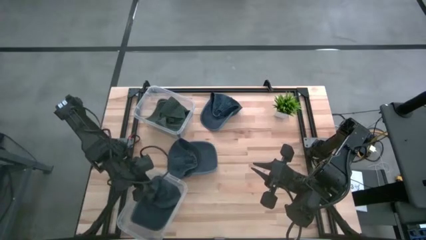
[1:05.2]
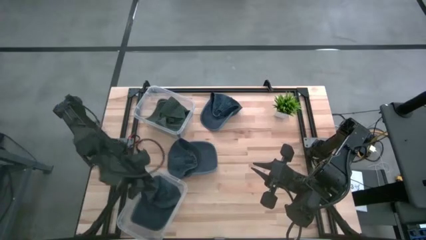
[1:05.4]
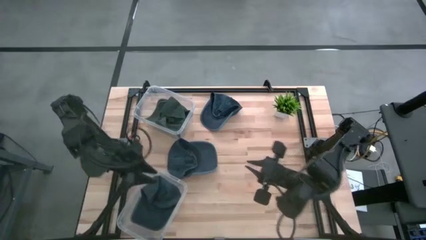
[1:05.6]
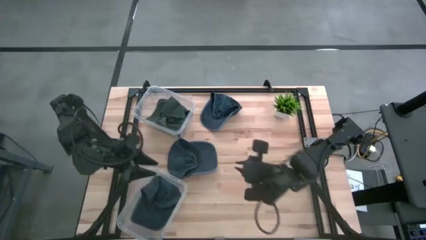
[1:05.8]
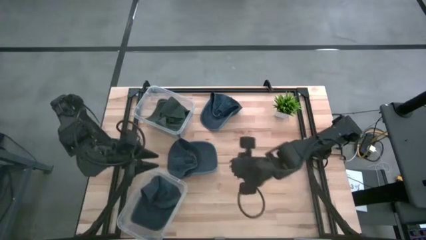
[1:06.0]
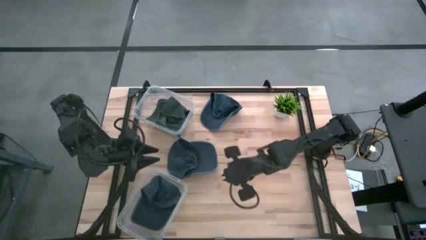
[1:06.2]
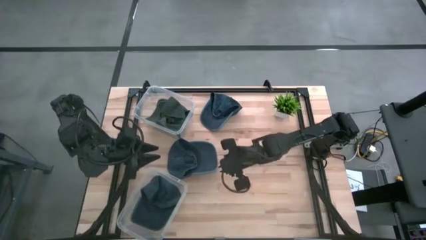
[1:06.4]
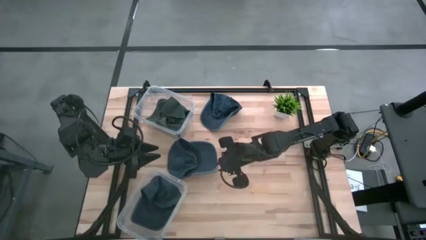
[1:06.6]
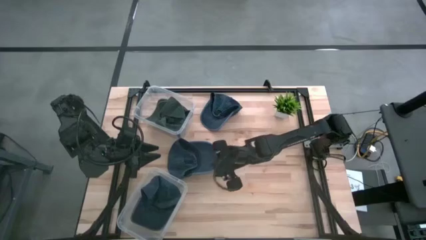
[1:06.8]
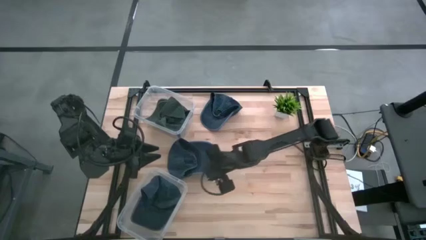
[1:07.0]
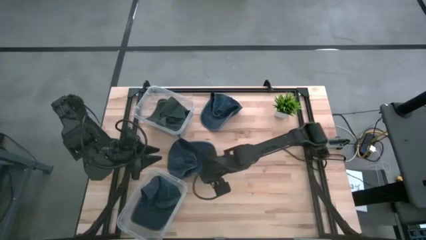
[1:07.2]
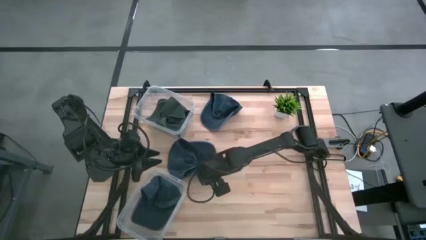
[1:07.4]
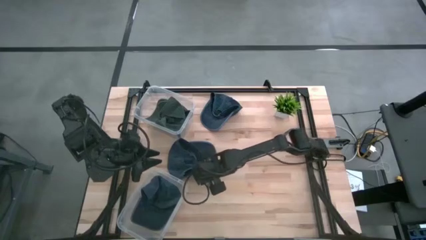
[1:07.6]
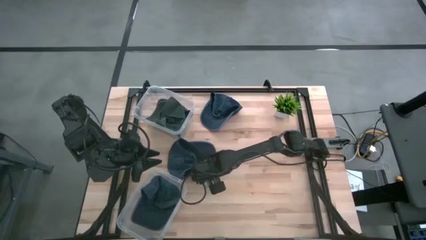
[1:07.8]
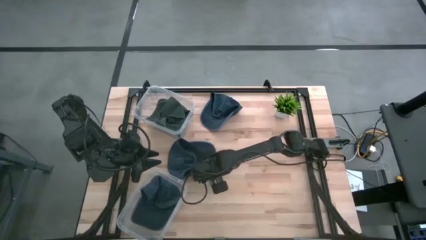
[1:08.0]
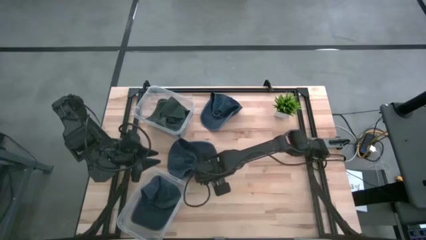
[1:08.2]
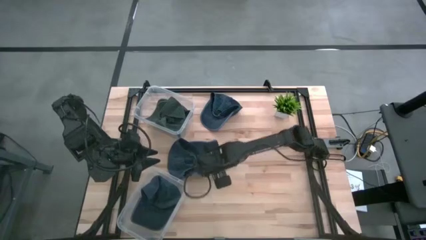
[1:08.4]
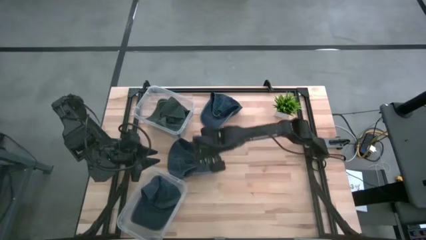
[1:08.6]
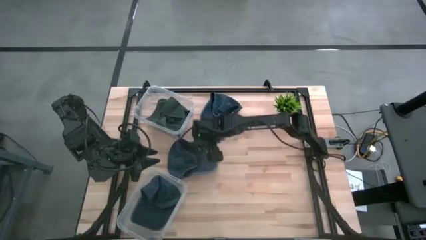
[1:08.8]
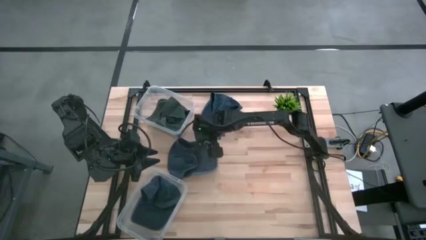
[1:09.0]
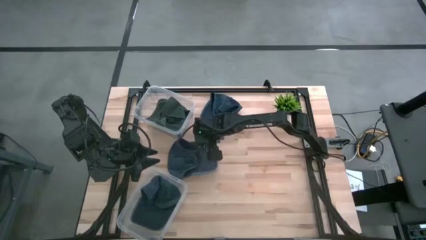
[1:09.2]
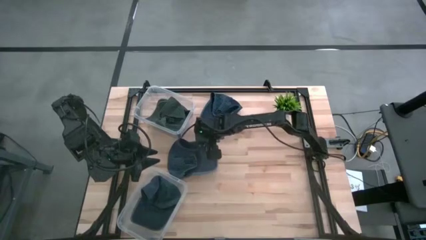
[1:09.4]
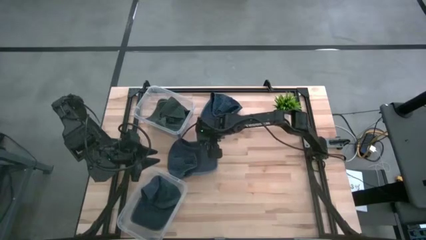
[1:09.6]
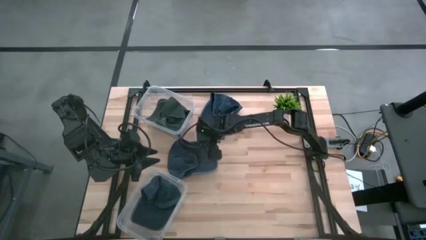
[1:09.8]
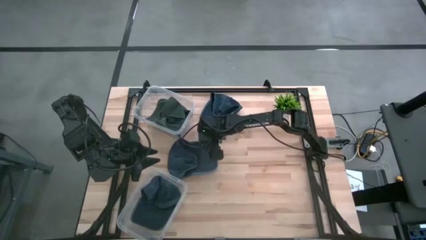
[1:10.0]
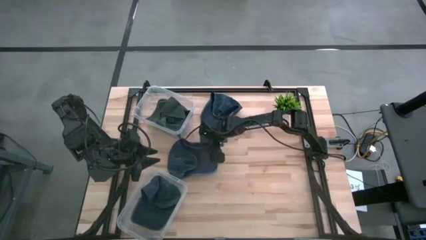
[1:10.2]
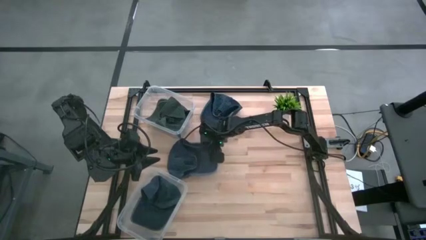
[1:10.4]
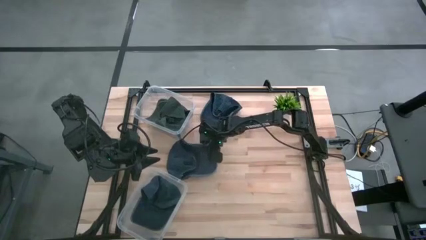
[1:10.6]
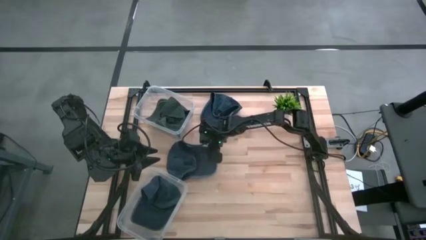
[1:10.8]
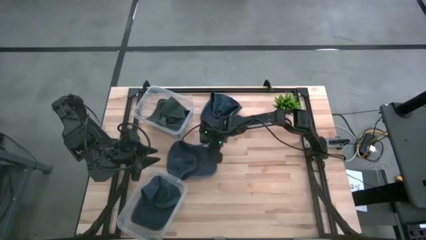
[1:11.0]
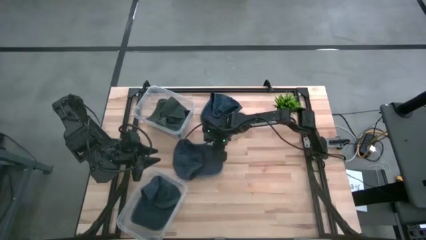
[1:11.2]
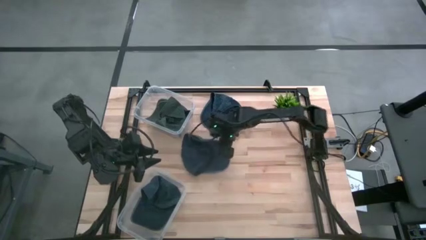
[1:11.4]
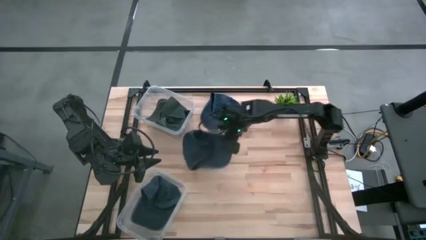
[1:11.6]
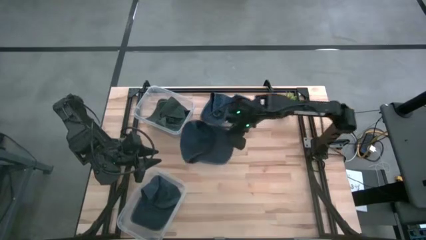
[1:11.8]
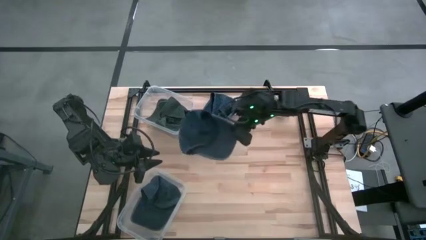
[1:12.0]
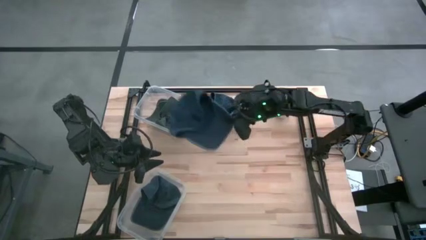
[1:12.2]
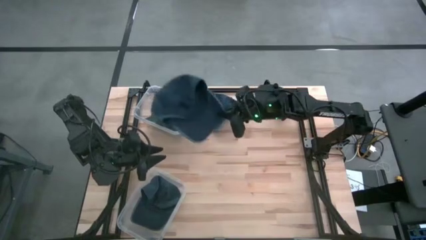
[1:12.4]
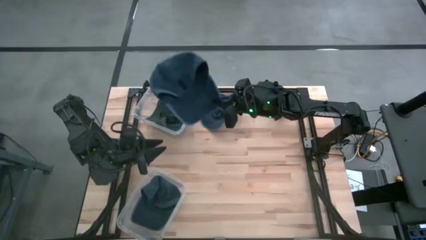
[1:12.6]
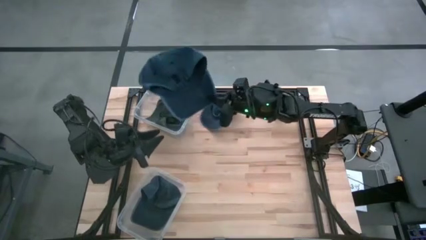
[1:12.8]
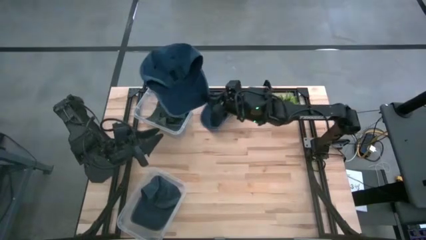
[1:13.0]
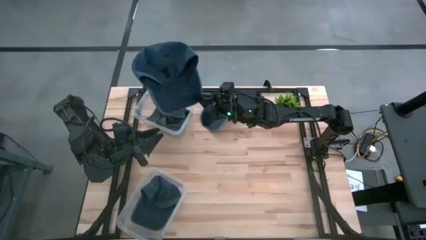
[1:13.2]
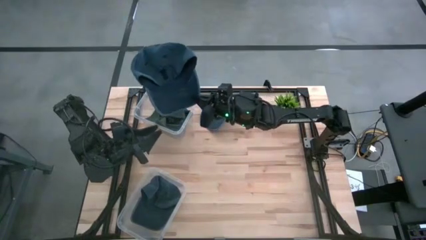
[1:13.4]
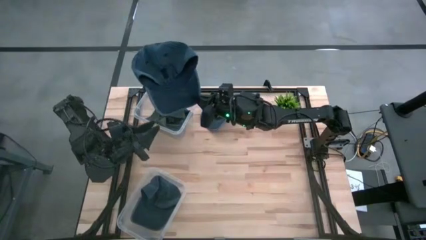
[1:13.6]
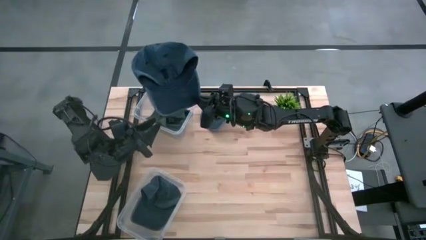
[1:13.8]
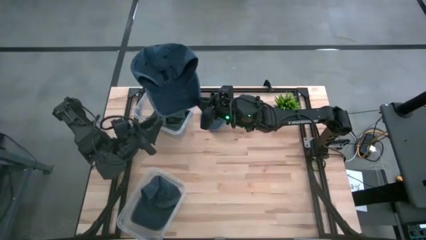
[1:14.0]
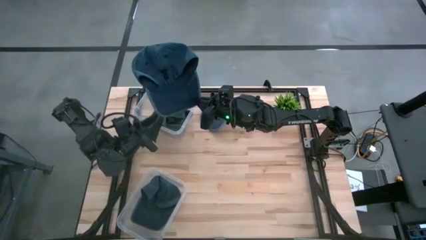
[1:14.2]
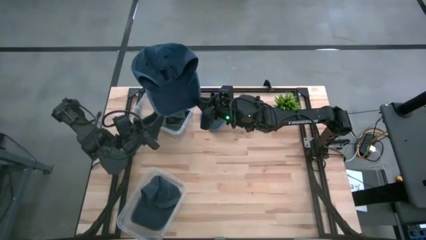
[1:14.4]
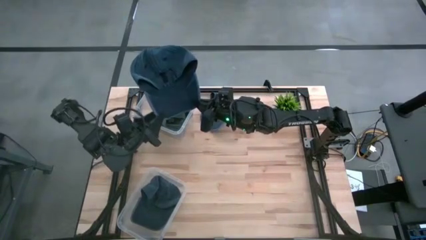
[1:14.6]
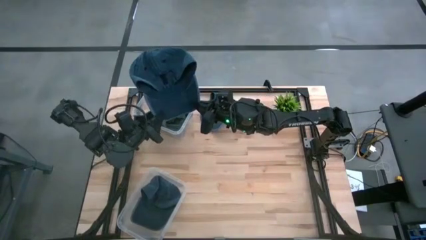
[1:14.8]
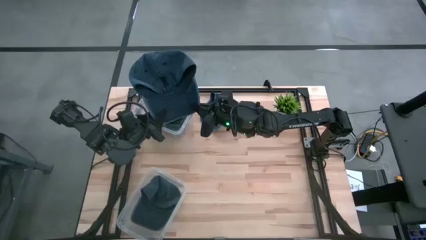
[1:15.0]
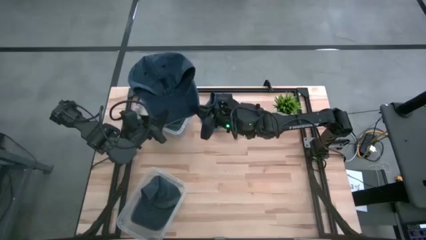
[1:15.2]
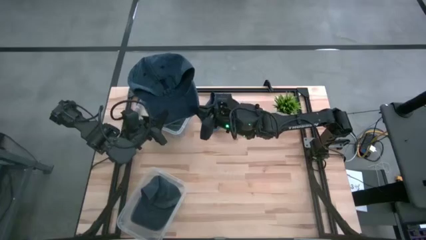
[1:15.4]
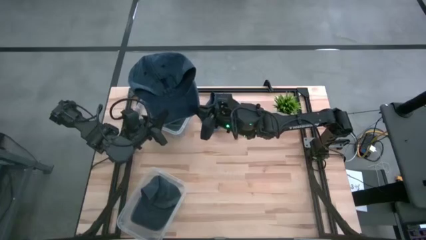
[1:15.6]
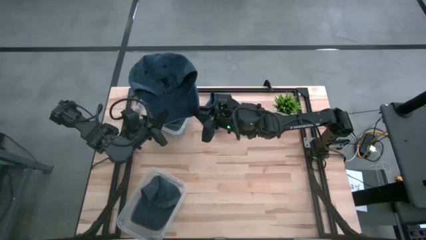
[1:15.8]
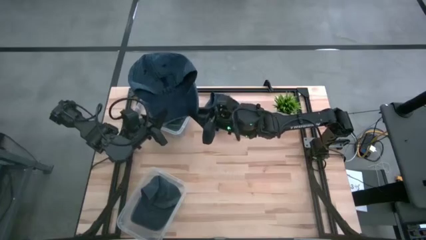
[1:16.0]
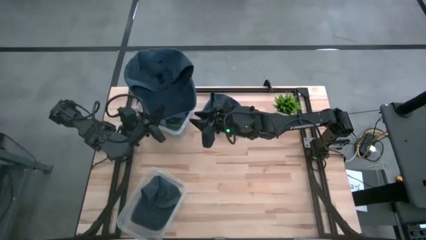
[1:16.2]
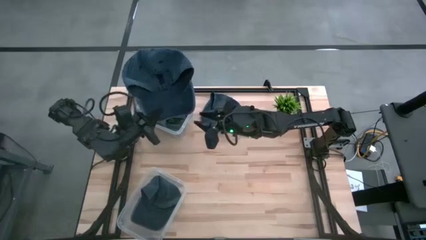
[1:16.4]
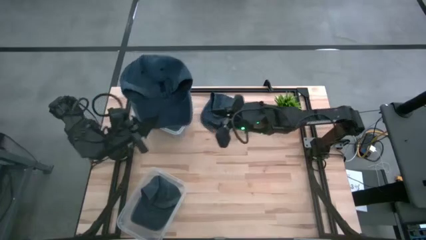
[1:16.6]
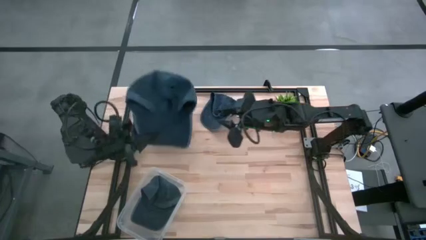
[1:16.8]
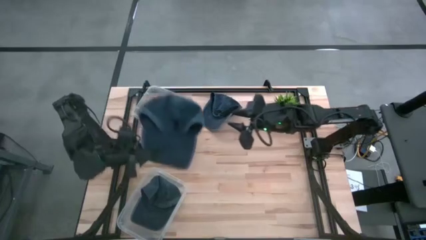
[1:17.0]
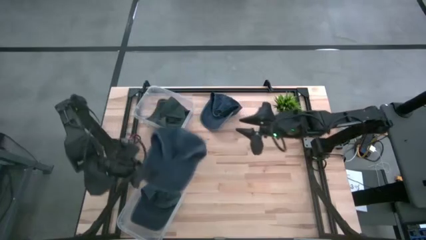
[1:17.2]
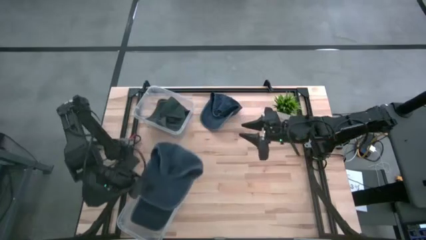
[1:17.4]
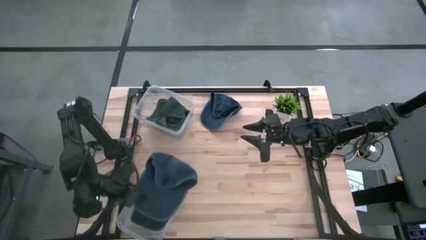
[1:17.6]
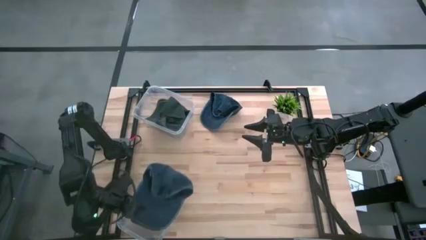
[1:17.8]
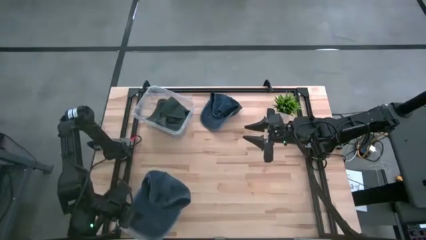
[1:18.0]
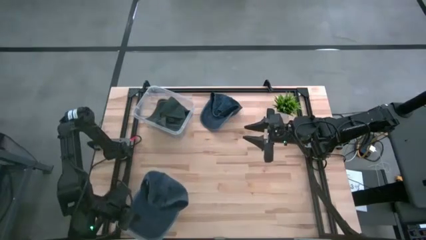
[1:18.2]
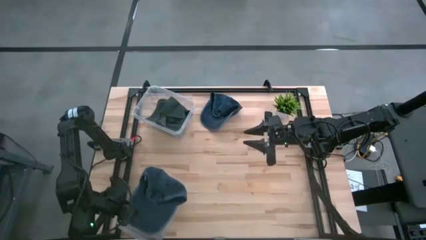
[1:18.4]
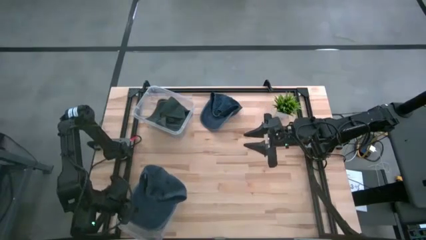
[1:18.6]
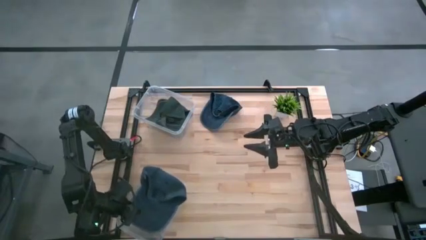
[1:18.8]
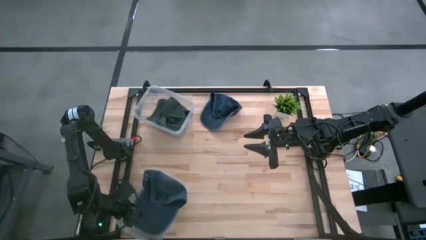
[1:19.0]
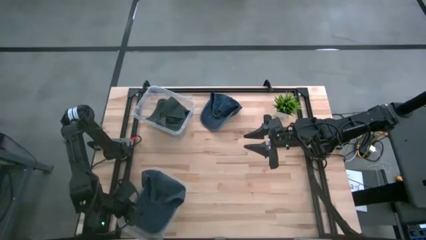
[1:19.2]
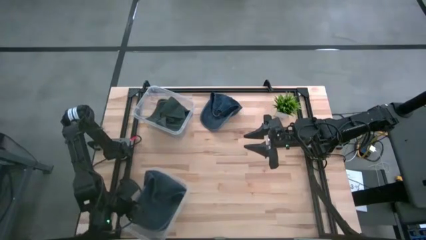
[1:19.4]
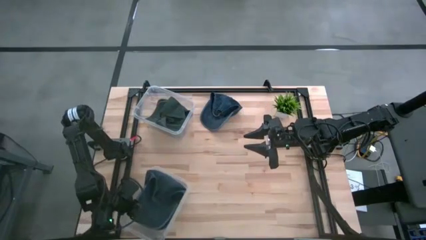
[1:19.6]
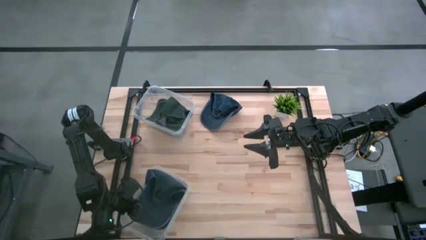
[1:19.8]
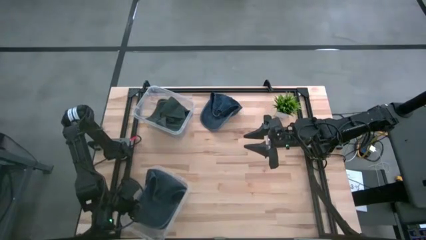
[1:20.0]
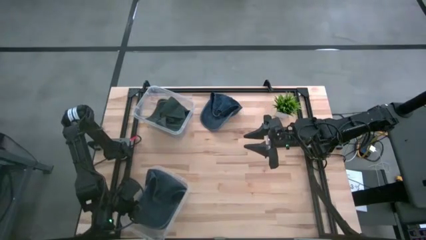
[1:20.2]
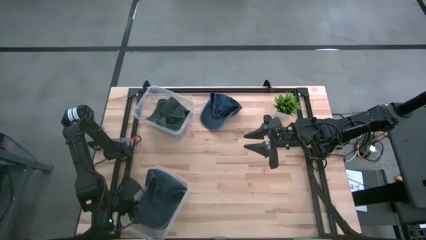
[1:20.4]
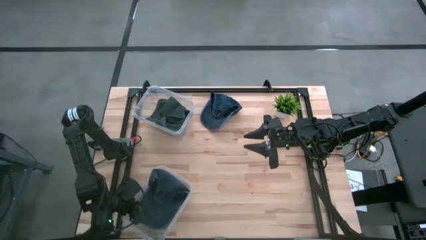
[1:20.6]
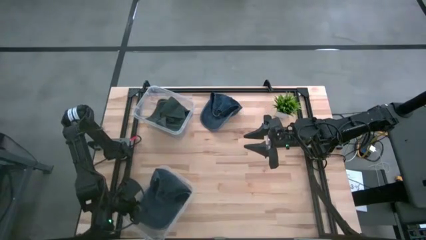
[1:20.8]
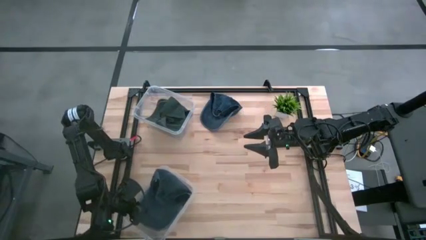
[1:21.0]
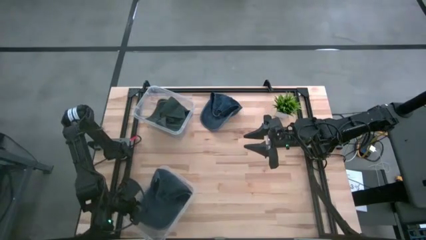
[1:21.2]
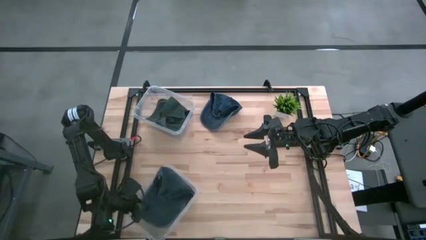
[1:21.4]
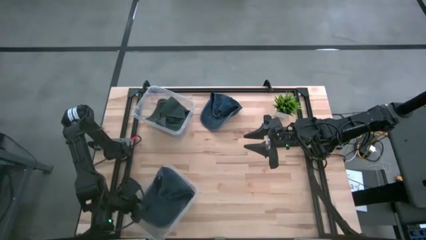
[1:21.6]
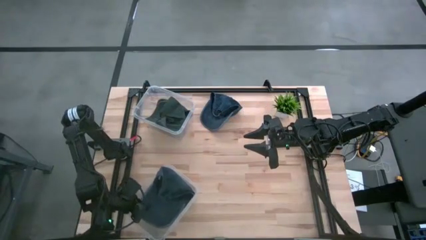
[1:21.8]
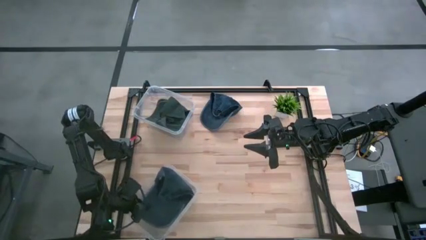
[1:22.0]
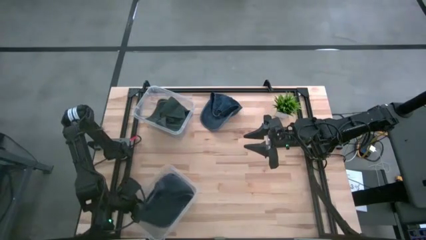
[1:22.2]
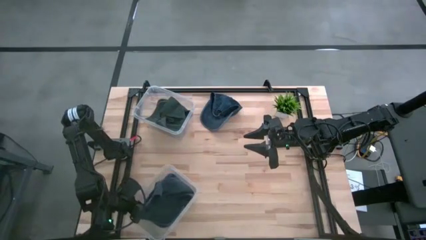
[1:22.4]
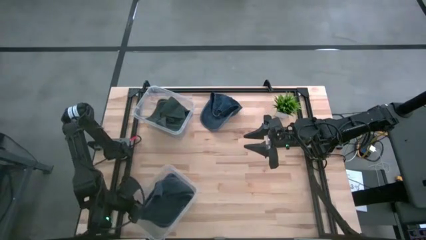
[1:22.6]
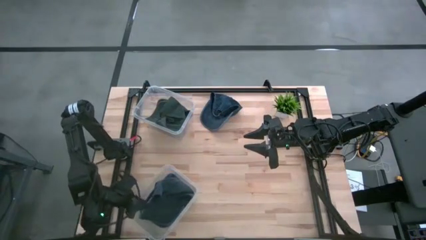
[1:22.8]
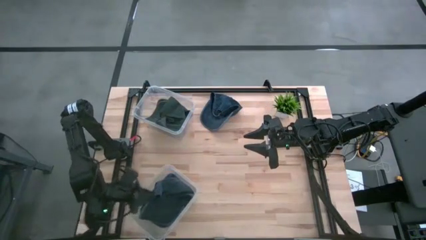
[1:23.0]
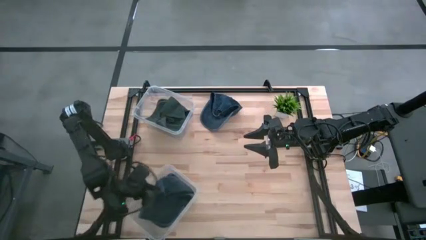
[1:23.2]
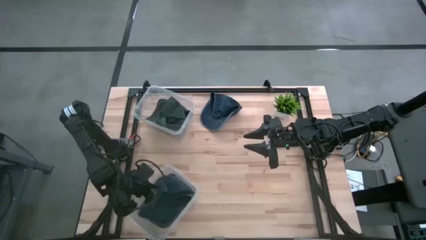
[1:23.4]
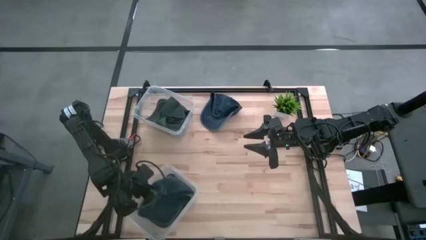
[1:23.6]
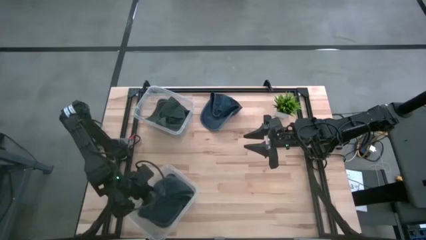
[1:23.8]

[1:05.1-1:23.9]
Task: Pick & Place hat
Put the bottom dark blue cap into the bottom transparent bin
